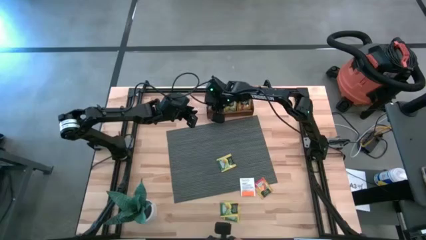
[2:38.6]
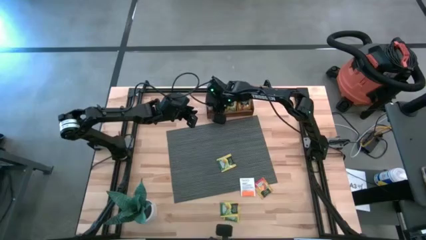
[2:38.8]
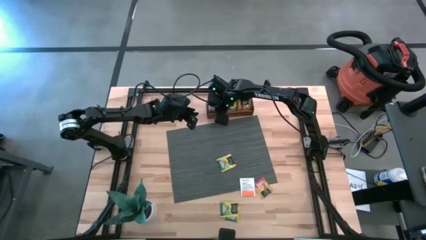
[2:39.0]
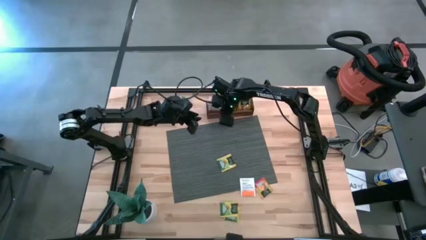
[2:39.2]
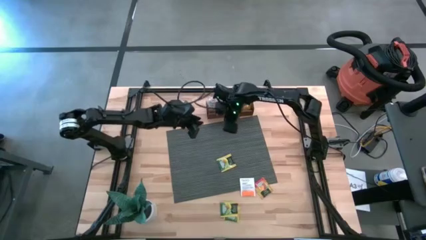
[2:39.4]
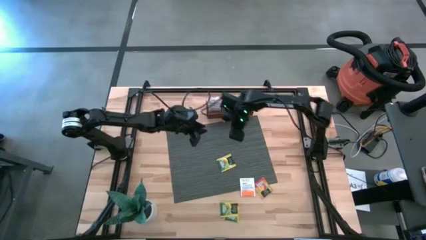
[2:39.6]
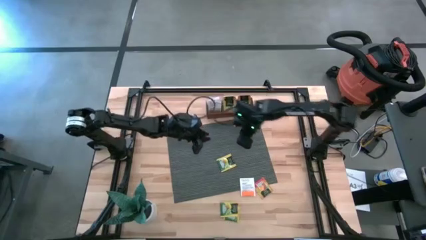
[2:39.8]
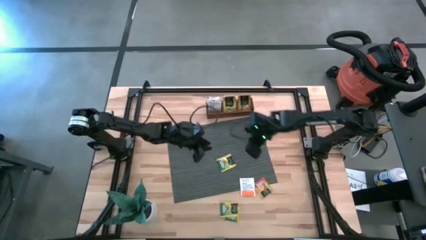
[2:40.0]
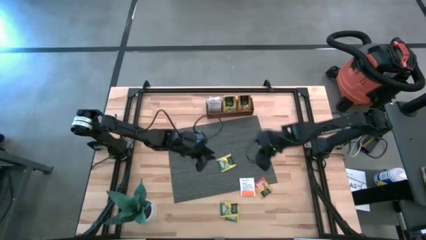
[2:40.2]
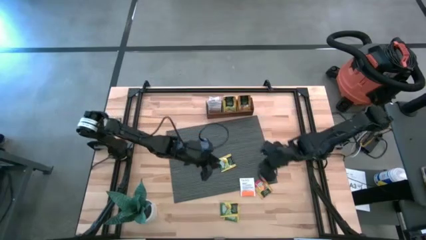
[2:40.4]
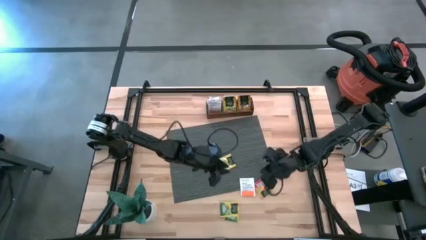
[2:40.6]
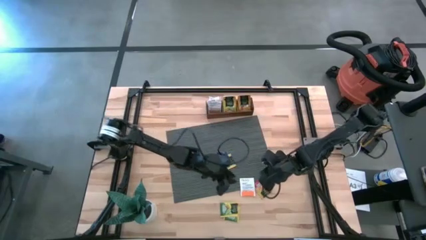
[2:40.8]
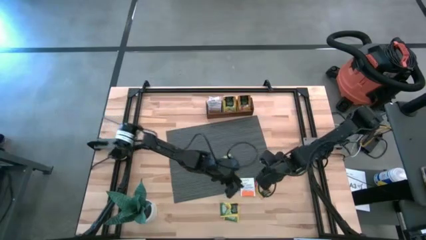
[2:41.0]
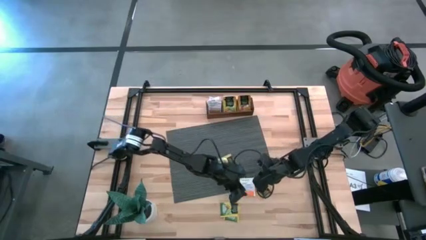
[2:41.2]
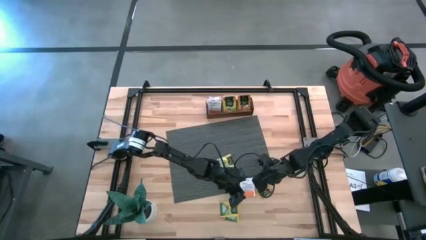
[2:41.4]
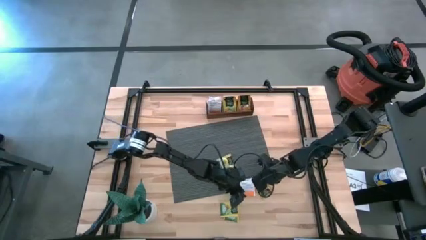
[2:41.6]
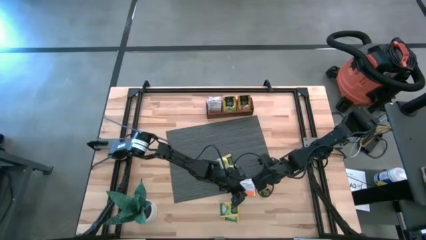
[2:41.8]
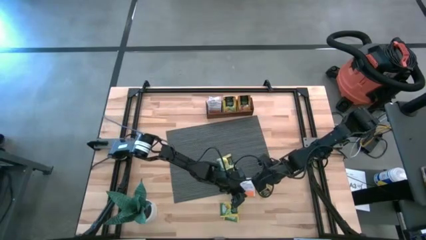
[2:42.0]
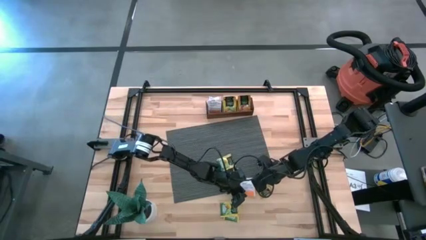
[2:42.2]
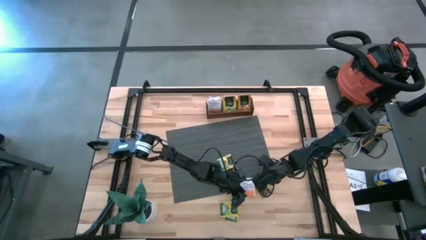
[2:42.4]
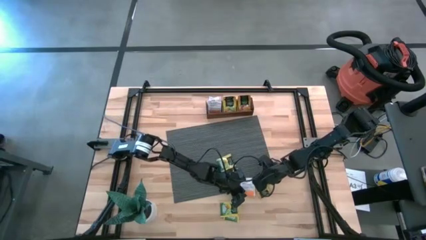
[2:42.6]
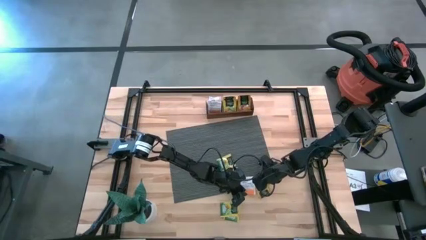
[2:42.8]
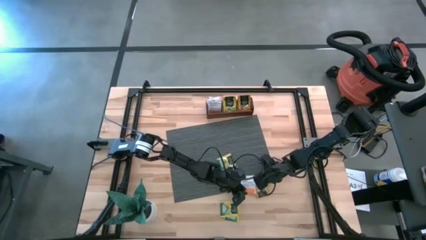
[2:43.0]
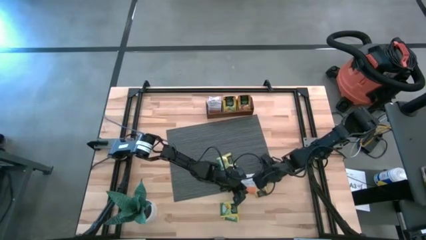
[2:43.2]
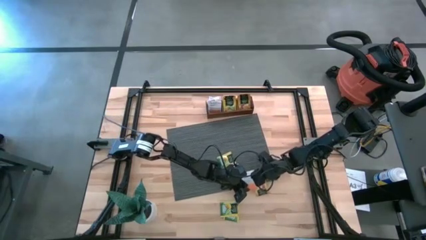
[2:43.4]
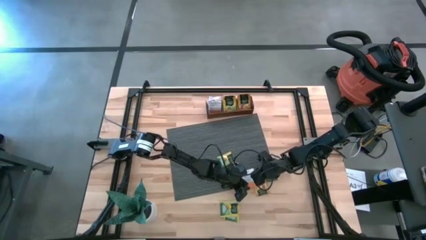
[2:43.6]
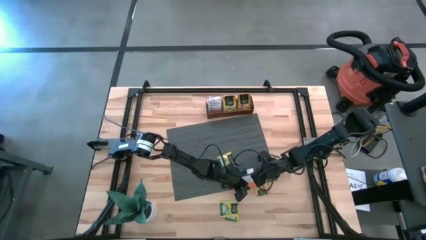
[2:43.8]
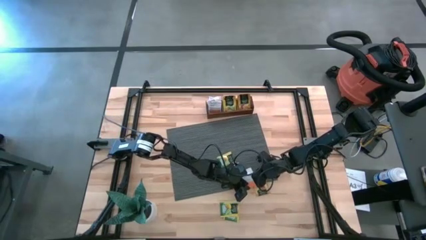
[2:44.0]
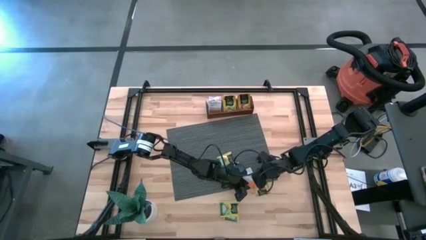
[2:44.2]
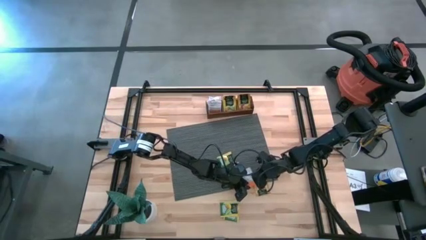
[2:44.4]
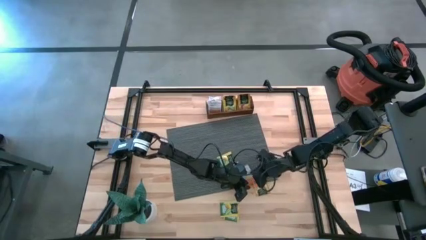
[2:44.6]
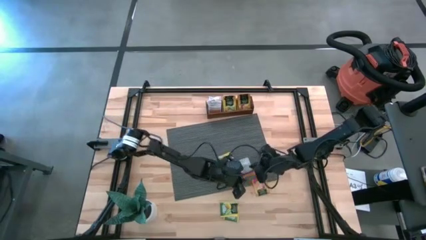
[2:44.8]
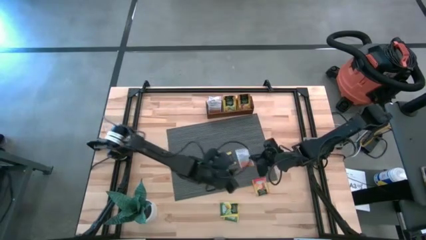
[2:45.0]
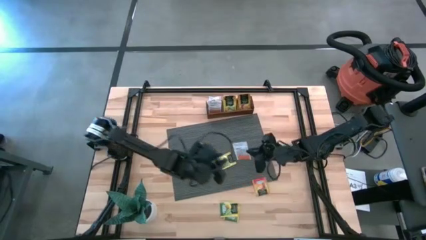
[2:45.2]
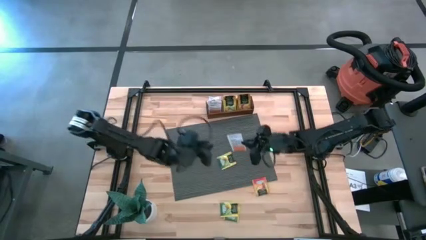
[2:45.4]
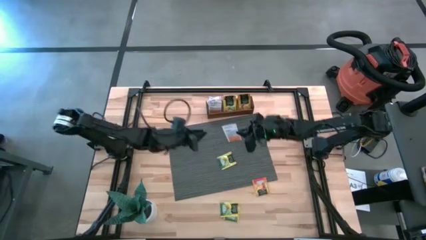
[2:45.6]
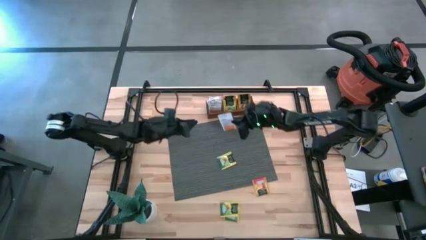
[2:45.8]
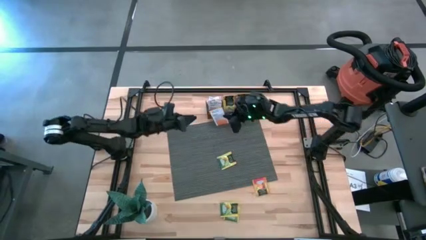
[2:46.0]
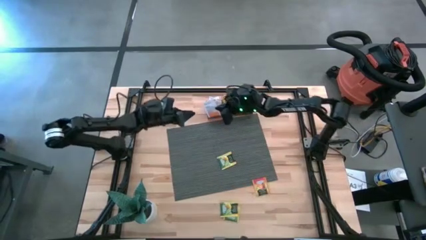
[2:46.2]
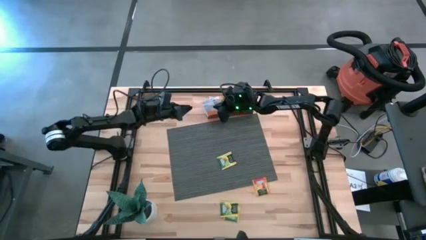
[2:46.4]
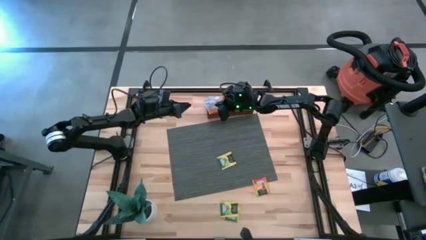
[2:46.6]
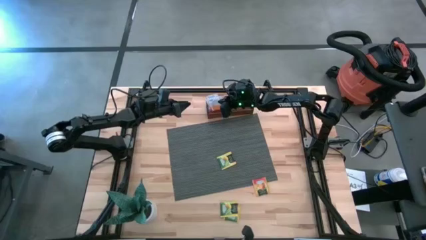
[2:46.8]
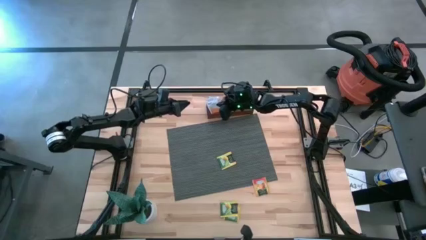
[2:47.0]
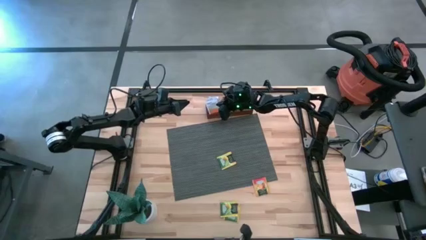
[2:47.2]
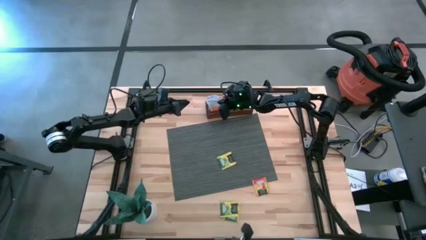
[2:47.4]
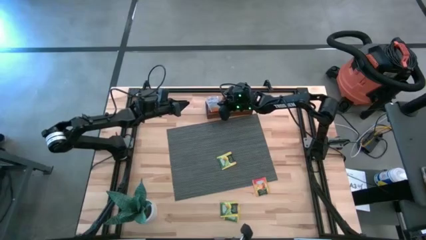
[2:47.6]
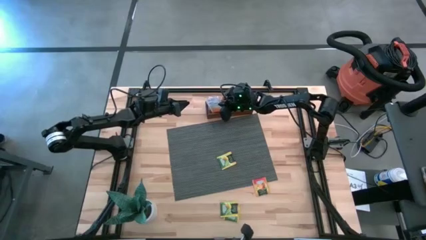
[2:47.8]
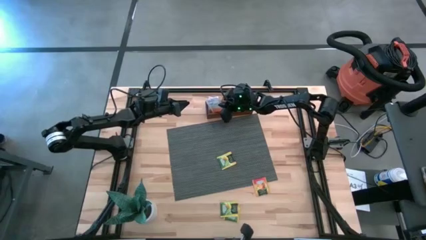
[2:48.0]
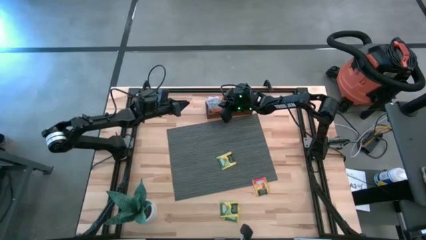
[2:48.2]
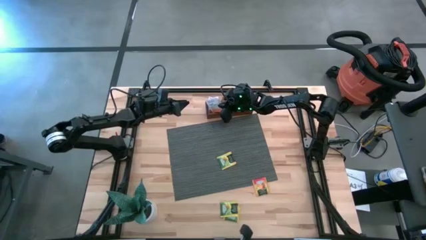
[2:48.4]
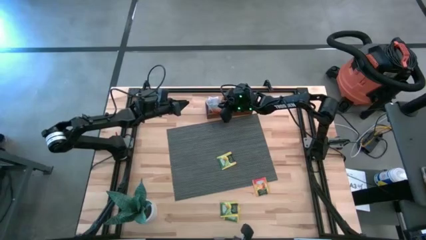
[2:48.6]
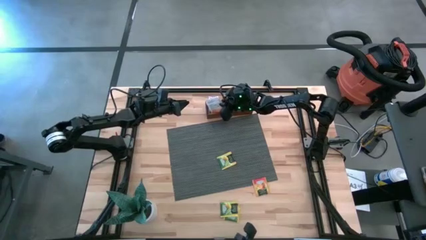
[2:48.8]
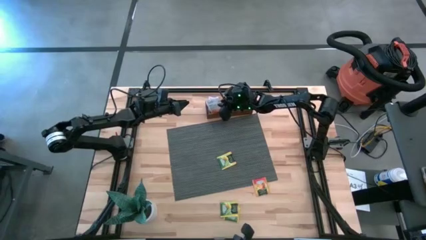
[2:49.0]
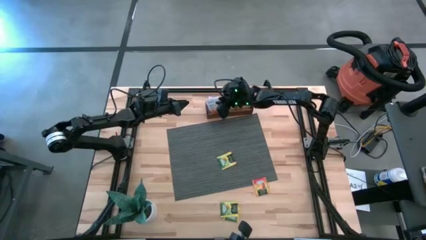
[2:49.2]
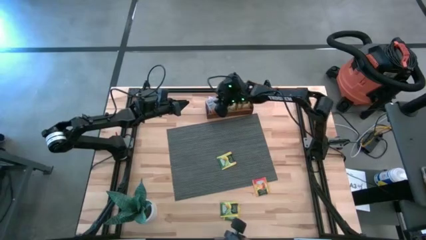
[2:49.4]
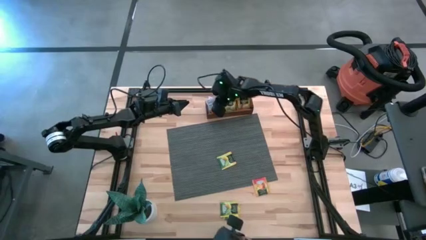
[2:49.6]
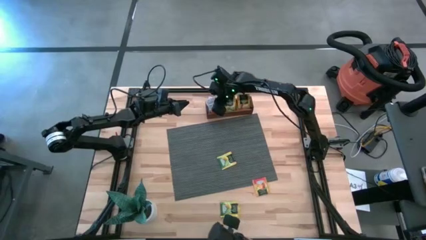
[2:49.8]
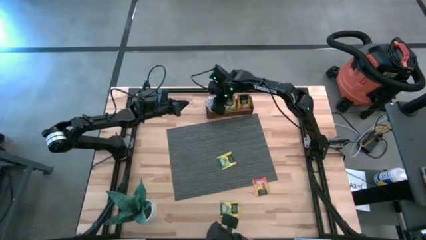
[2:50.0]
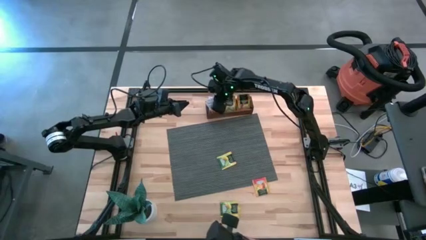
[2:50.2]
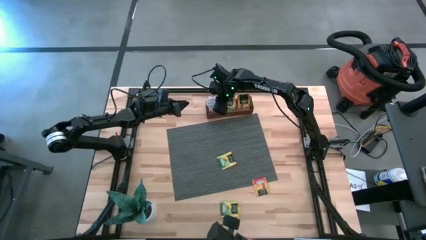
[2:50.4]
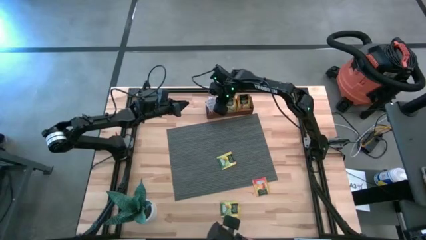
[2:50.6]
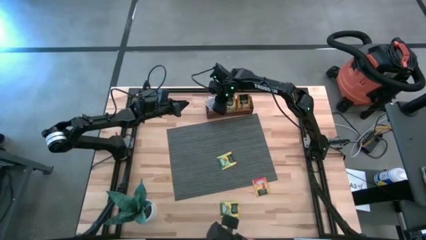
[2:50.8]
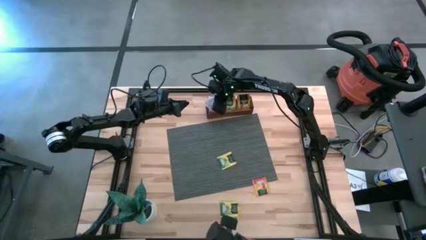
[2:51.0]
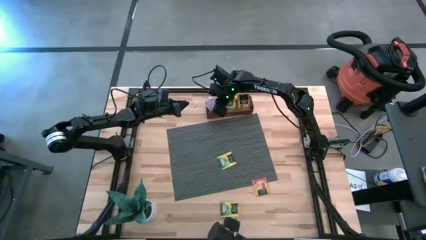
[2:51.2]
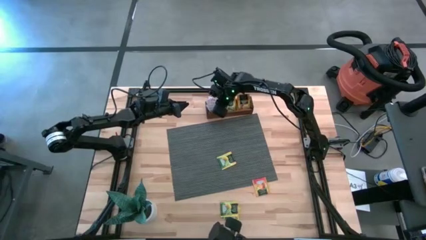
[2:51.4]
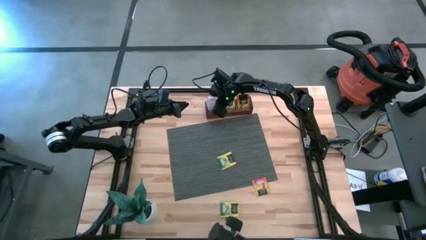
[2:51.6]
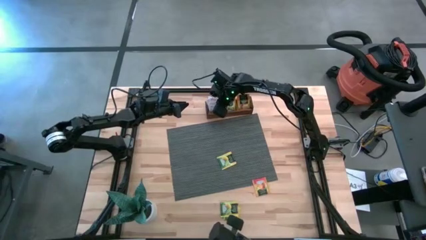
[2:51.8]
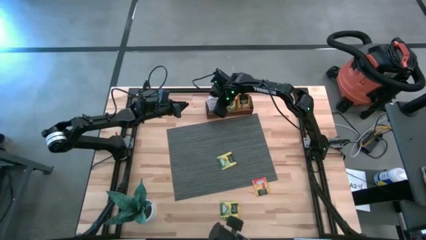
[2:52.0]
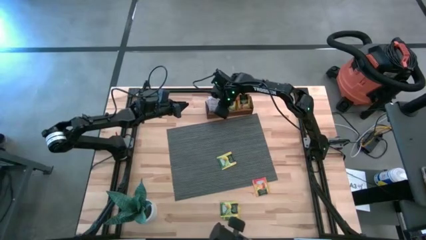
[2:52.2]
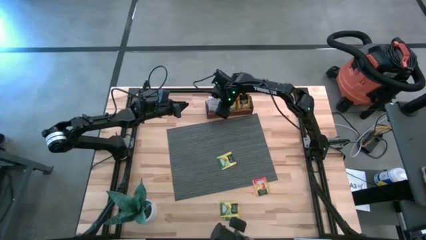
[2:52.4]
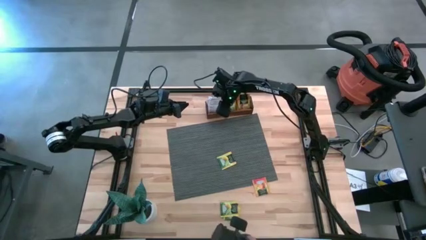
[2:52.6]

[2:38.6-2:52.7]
Task: Pick & Place Tea
Put the white tea bag into the left section of the wooden organizer

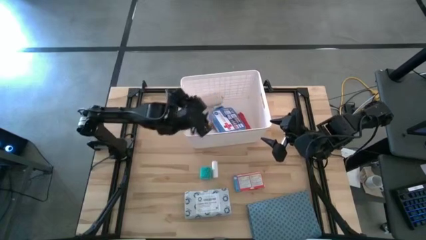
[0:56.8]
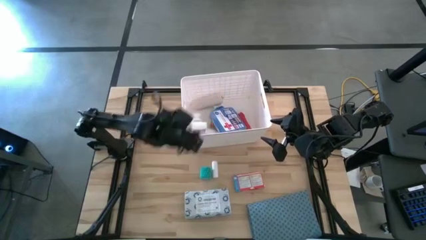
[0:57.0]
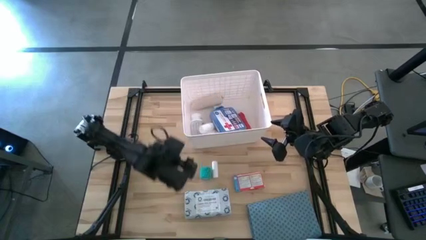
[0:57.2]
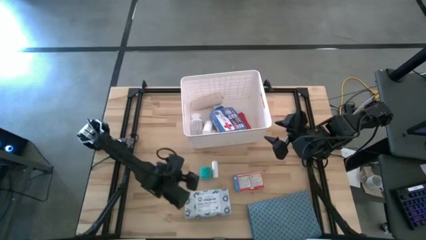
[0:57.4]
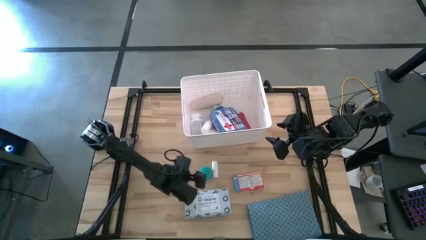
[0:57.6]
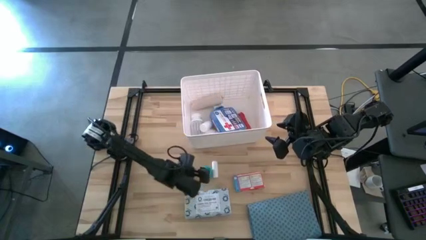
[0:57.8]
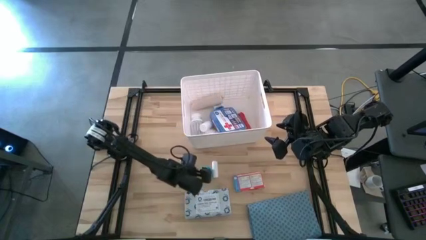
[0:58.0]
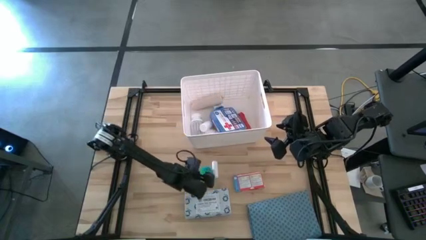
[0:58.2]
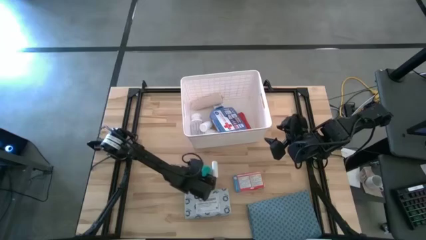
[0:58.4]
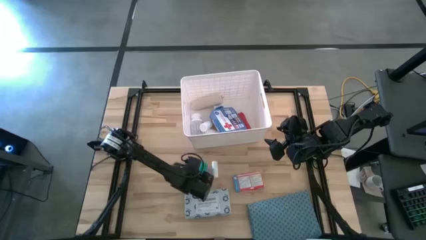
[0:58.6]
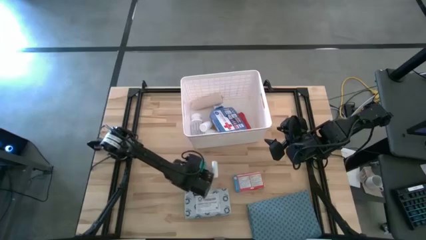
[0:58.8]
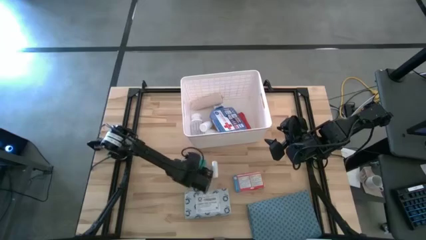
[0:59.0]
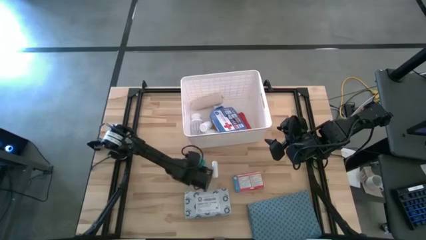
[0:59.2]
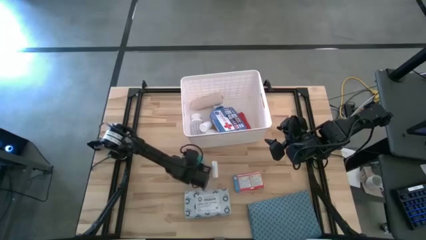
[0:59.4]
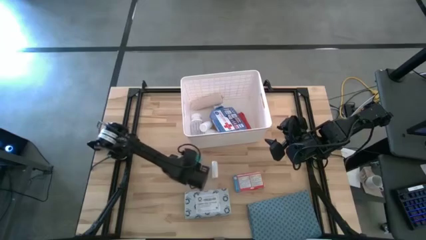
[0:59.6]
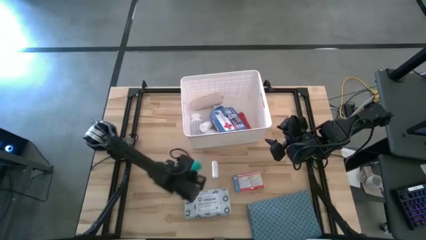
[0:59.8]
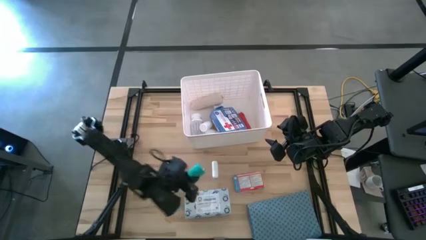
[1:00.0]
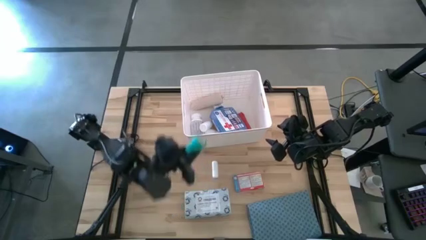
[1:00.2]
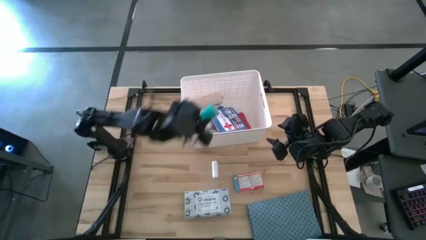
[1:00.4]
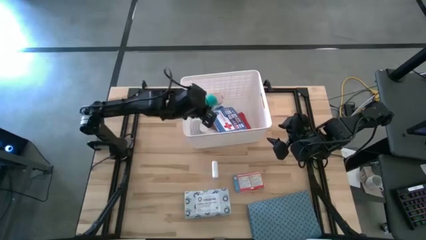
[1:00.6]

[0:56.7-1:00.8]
Task: Pick & place medical supplies in basket/bin
Put the green bandage into the white bin
